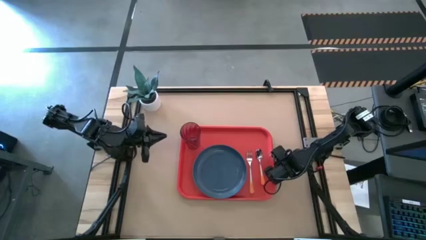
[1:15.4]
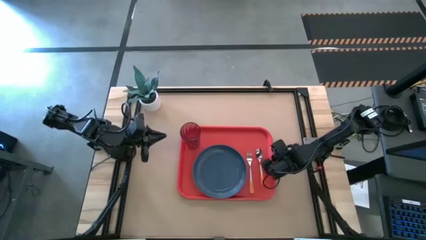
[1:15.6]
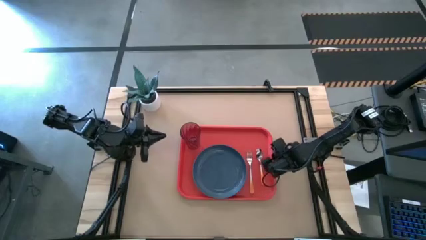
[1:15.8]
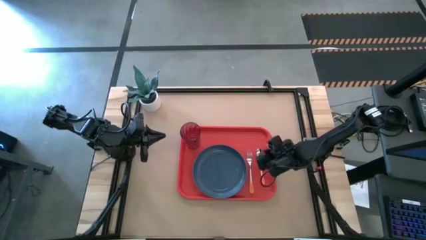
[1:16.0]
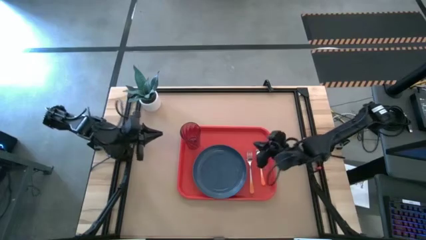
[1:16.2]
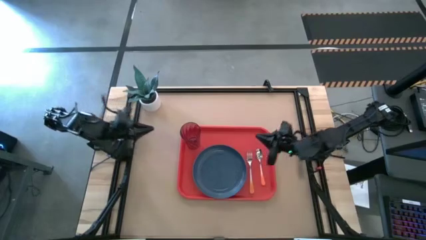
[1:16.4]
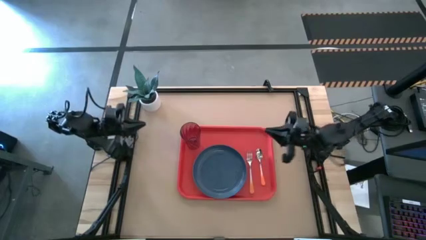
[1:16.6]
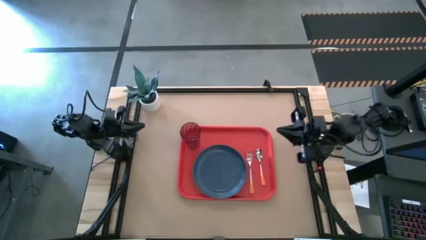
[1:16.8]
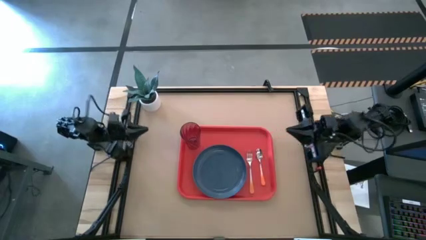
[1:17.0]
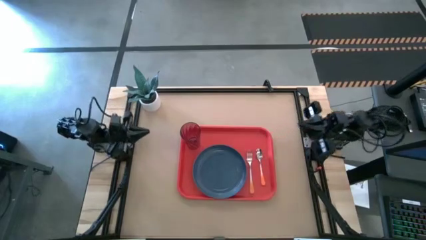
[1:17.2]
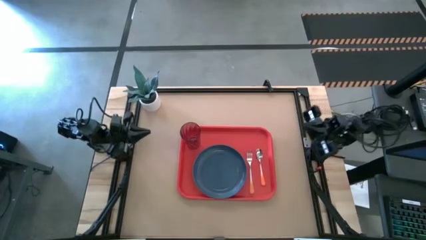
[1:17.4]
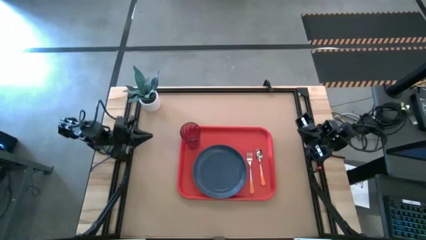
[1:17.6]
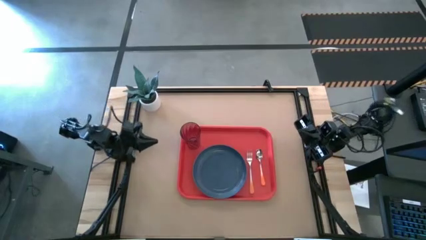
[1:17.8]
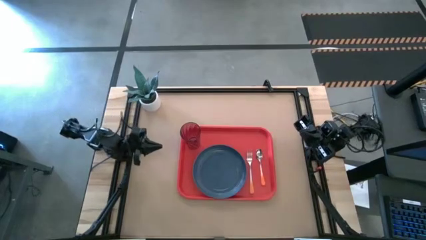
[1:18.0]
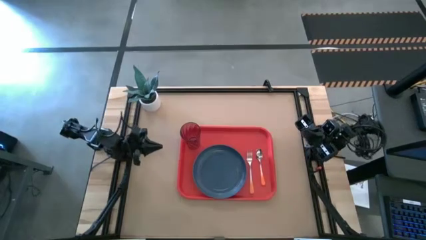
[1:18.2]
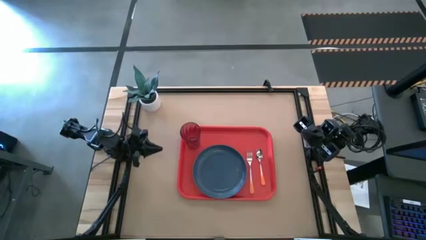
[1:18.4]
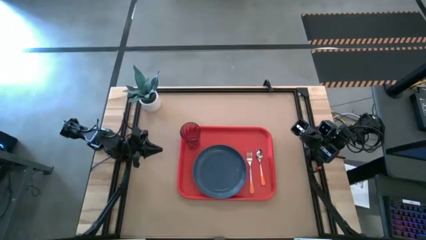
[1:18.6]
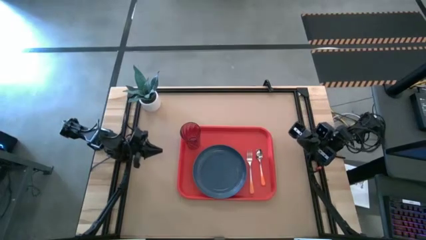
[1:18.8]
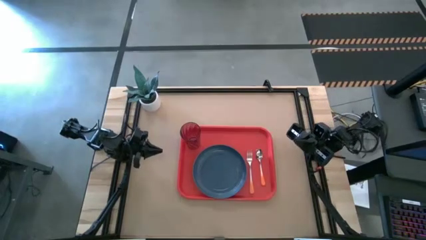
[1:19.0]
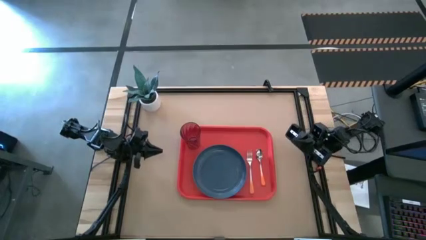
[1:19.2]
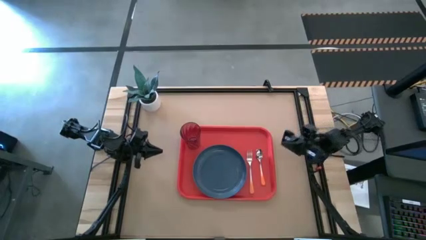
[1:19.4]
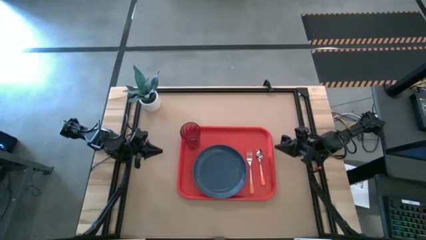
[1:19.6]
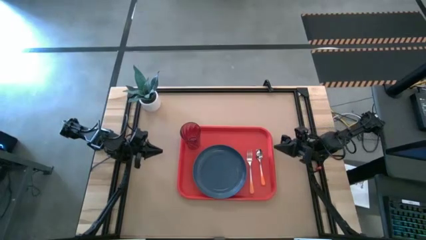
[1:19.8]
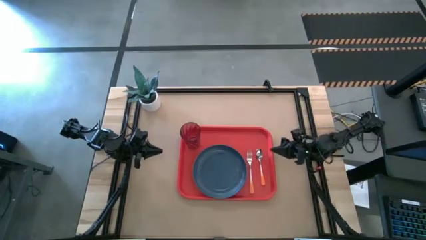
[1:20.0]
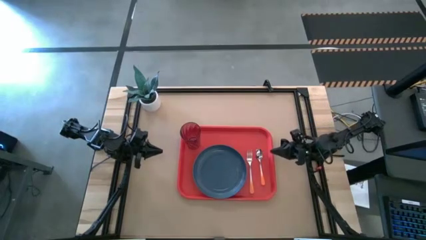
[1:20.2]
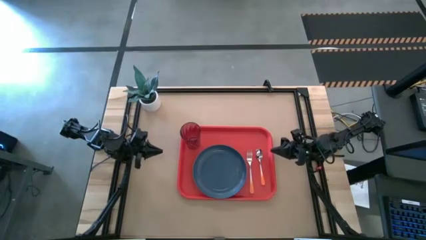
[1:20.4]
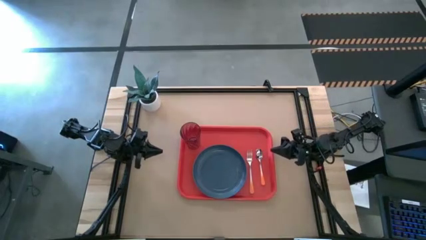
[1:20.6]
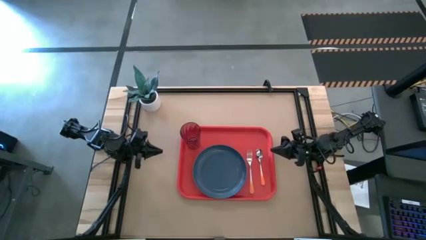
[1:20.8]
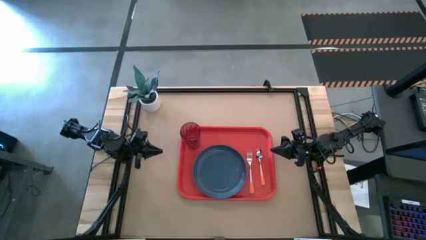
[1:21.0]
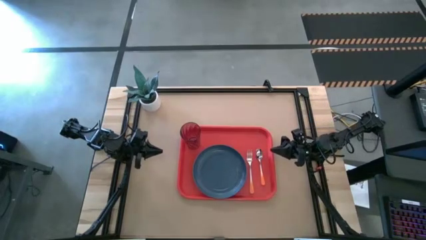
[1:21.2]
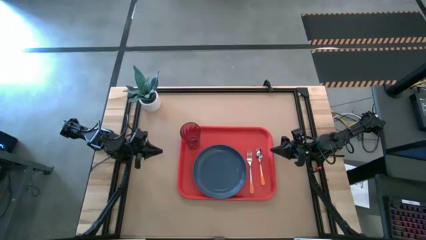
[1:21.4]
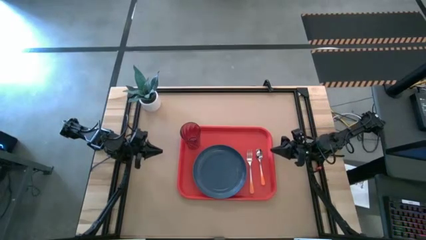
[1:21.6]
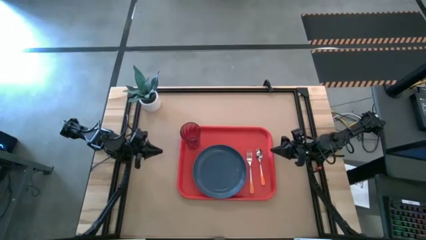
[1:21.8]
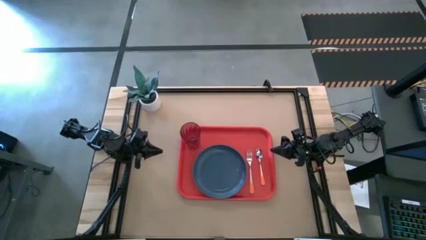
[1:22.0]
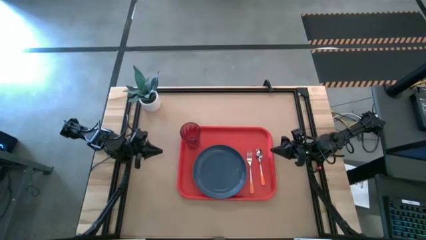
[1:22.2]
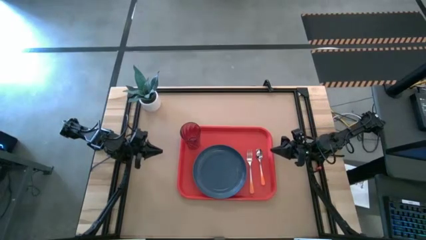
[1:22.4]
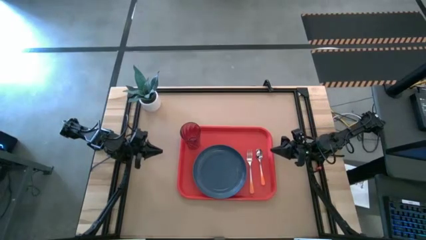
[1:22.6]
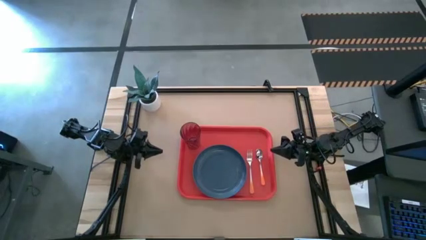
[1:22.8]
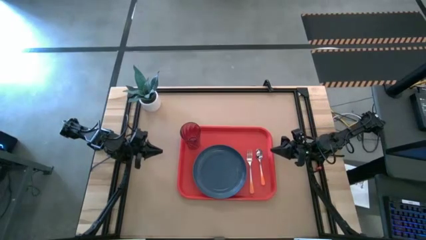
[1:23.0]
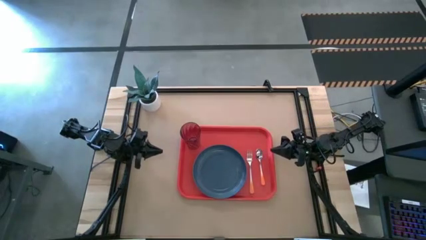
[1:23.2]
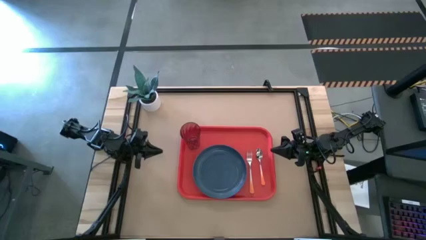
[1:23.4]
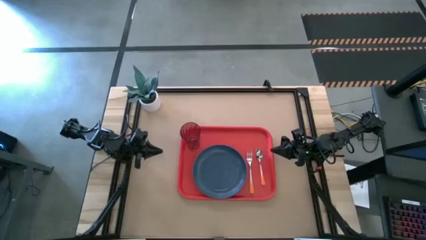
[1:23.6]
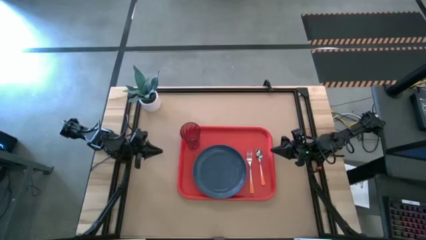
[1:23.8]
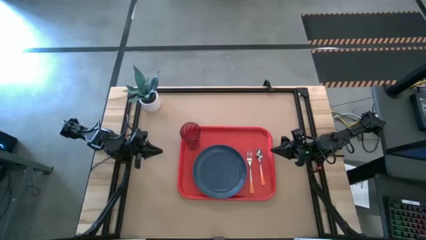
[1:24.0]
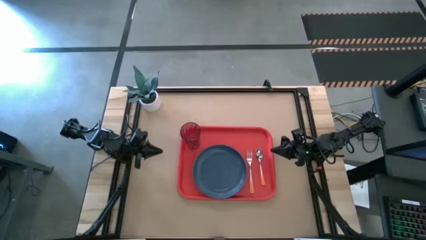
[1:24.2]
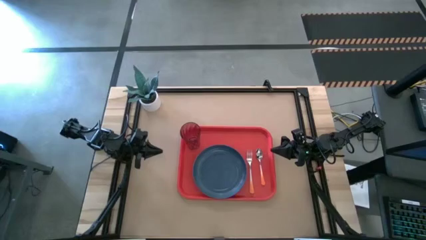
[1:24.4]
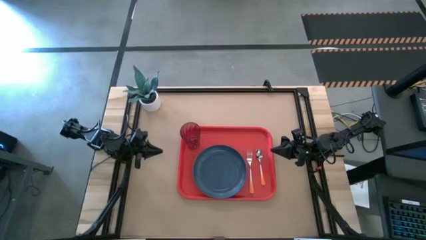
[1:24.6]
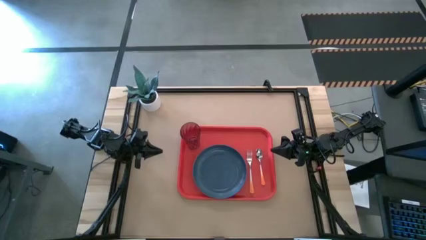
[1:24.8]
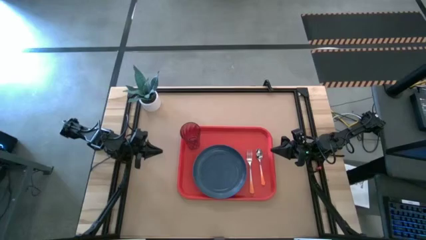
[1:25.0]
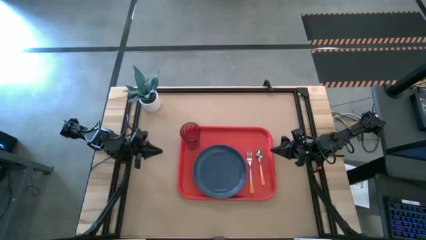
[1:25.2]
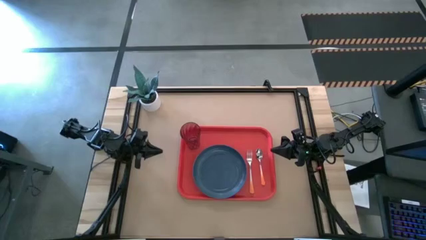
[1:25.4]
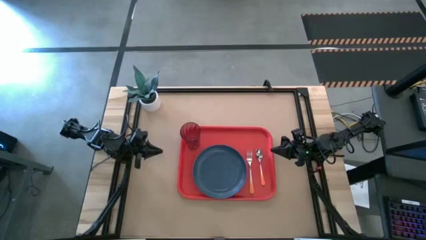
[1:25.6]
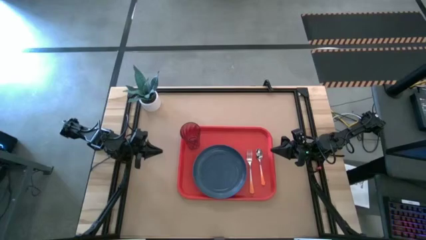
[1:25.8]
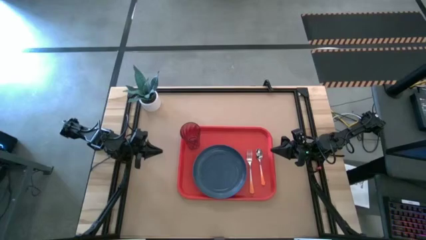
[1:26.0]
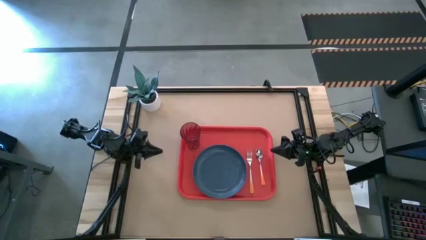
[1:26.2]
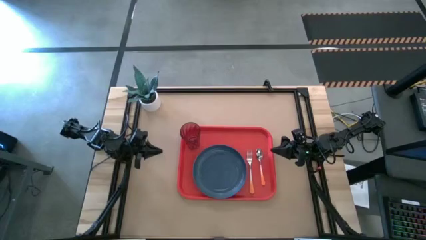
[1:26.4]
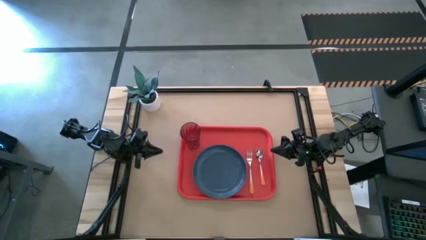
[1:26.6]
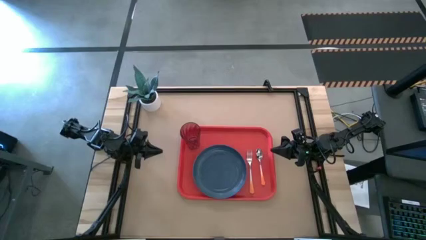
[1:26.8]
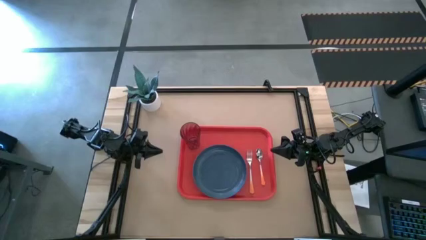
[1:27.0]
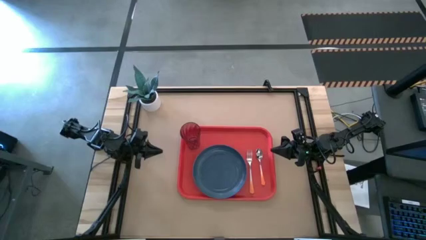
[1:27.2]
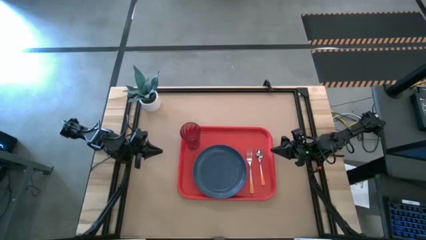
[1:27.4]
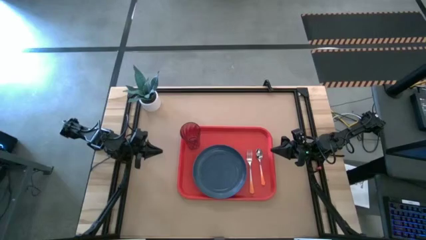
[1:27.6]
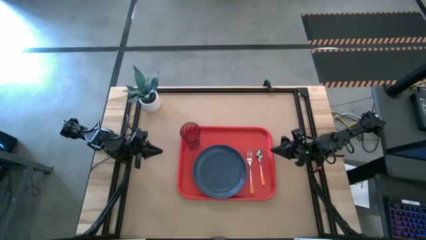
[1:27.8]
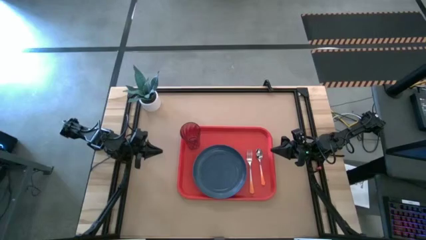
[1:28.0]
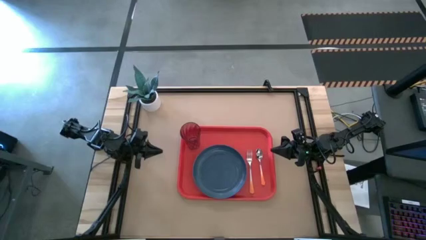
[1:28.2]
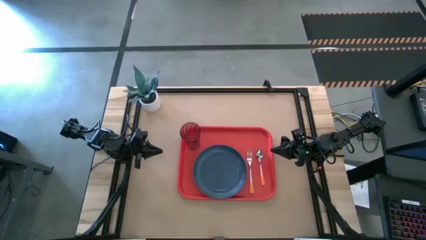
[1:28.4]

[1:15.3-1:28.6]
Task: Pick and place plate/cup/fork/spoon on tray
Return to Home Position

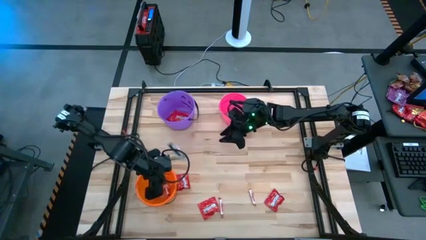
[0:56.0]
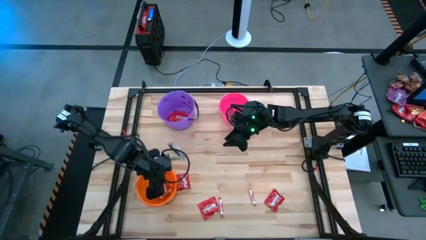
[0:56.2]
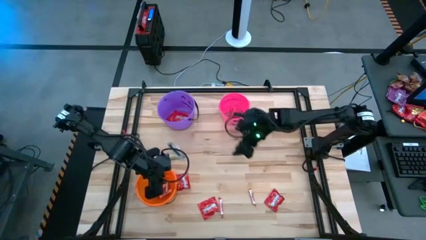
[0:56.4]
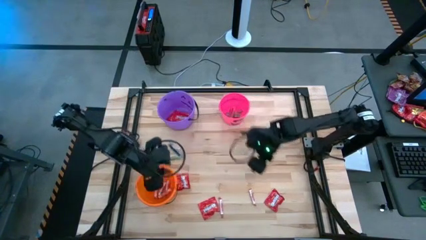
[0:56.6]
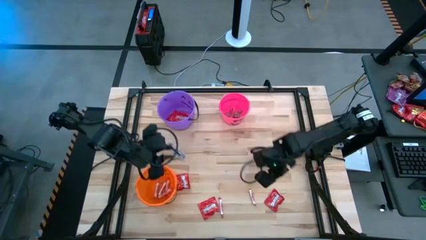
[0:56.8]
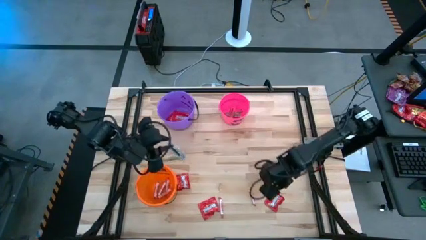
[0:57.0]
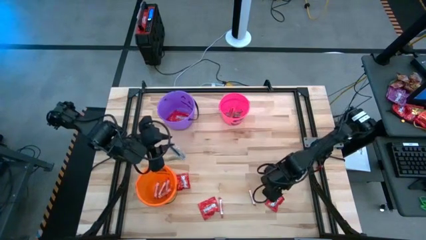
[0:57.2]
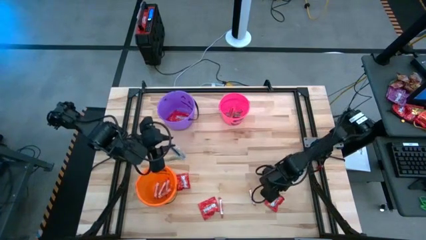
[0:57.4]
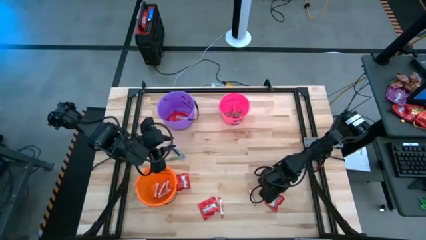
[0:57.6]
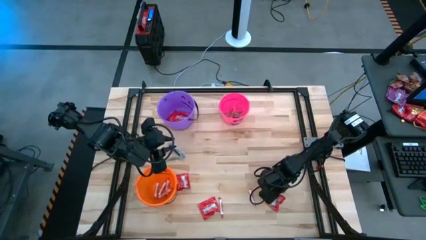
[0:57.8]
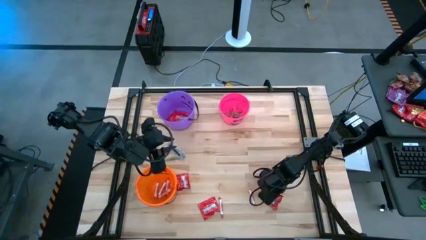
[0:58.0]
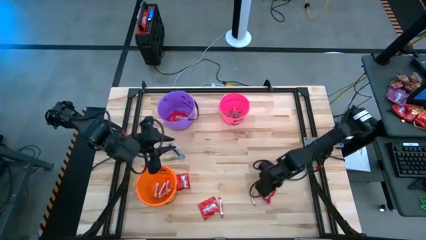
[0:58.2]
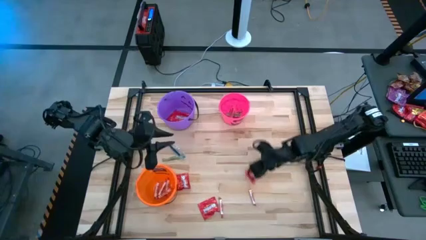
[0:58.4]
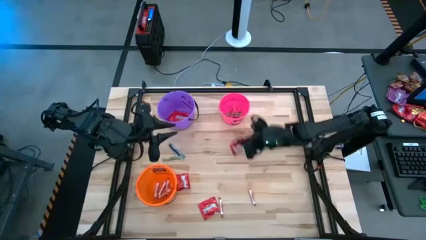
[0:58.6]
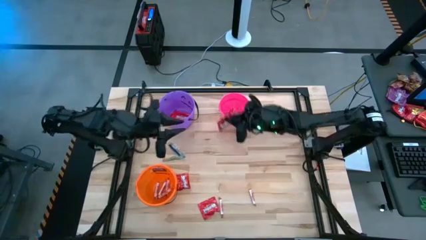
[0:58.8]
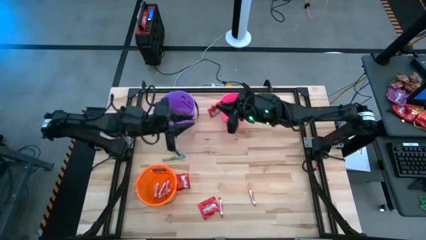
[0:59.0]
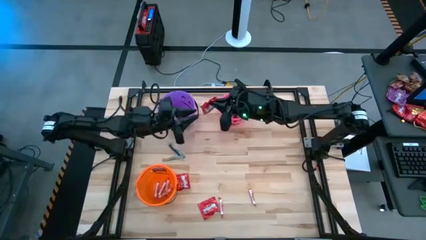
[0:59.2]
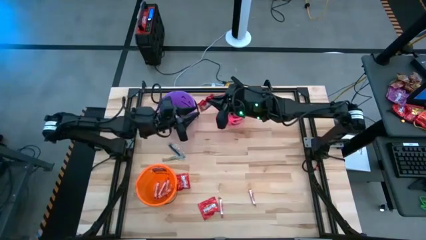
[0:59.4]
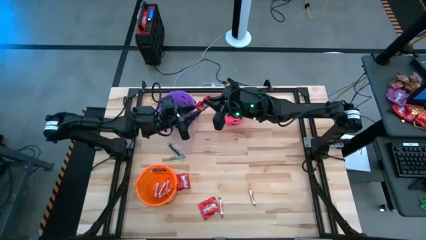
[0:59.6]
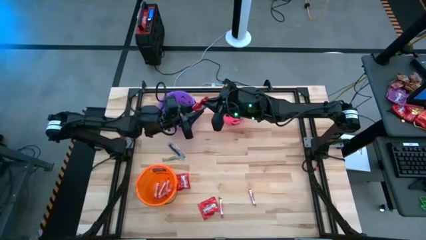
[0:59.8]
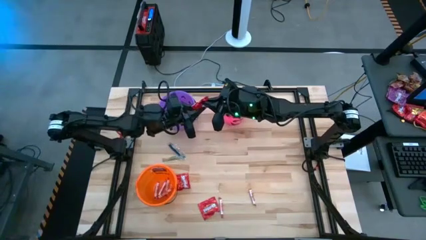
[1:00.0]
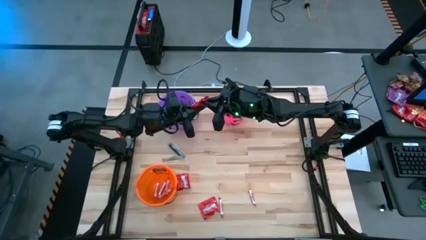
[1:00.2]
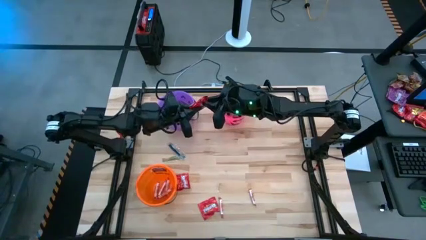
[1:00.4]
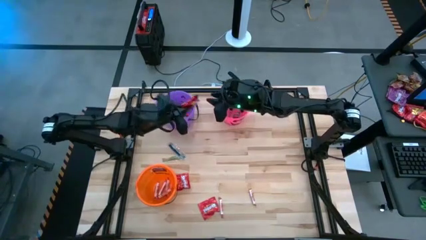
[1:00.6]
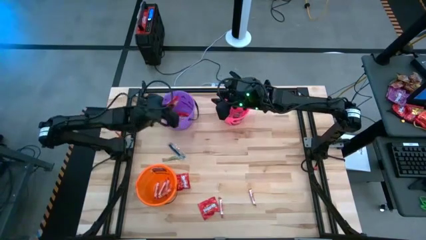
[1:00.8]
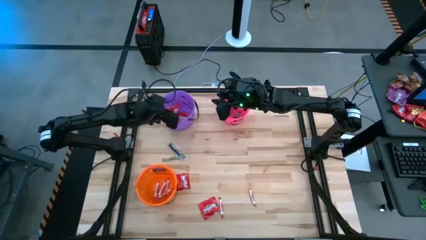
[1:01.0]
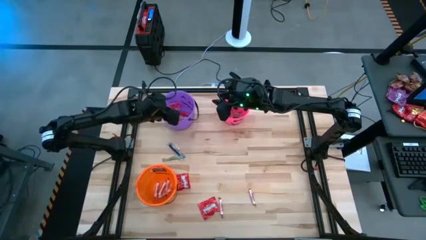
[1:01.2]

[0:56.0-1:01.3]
Task: Sort candy by brand, put in halloween buckets
Put the red candy into the purple bucket
